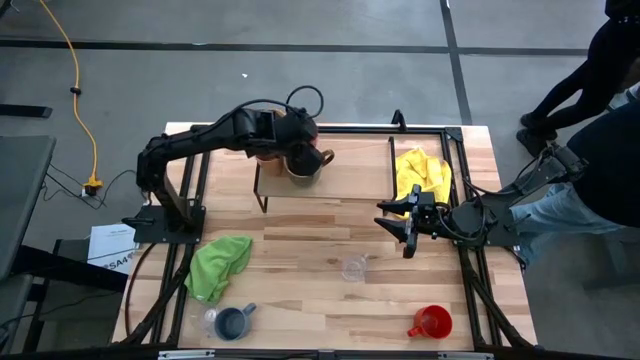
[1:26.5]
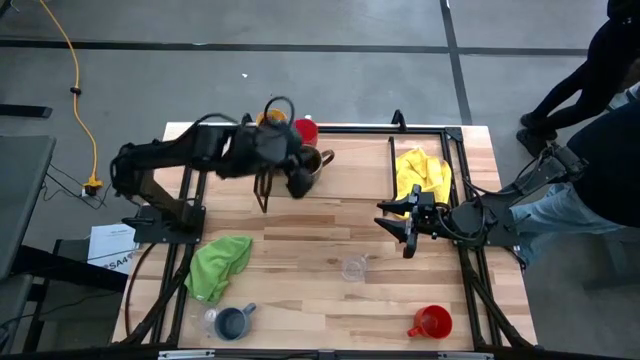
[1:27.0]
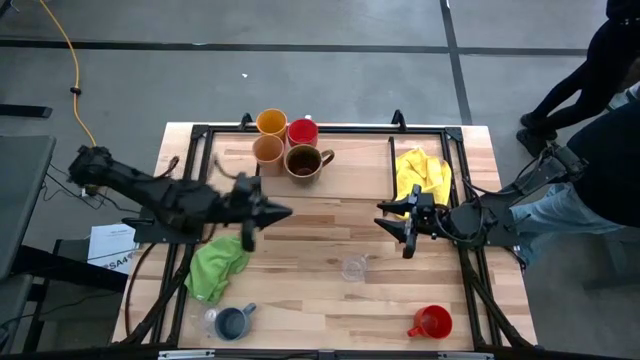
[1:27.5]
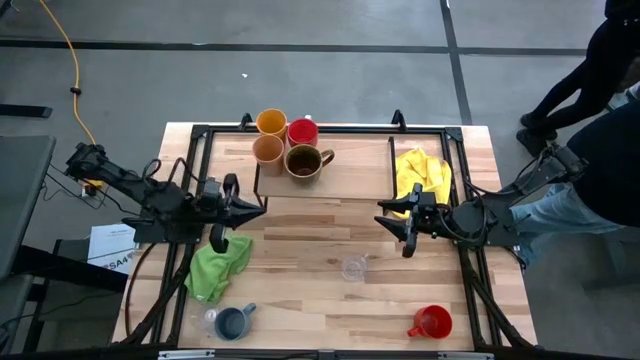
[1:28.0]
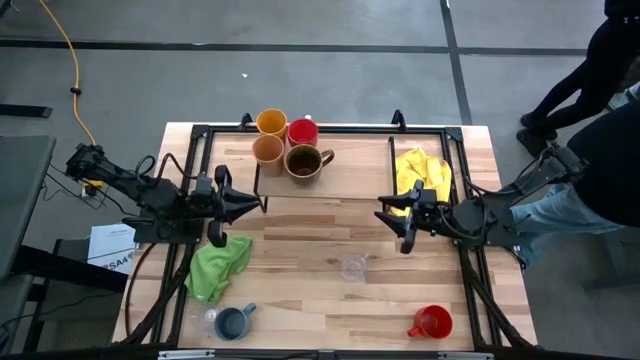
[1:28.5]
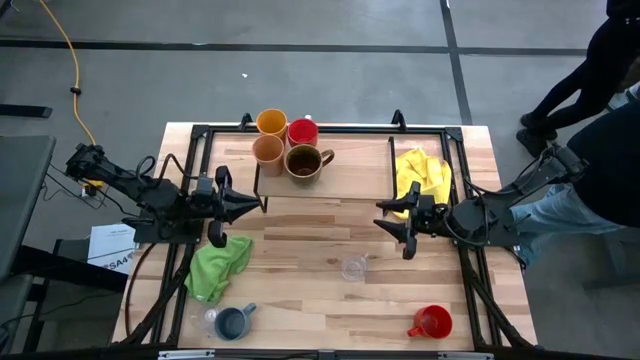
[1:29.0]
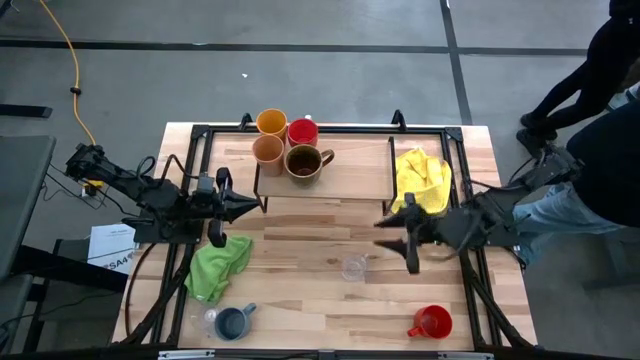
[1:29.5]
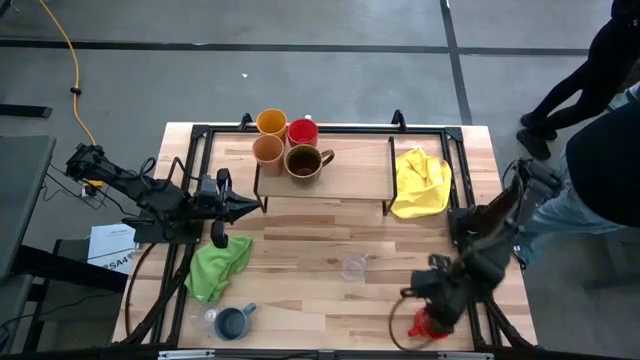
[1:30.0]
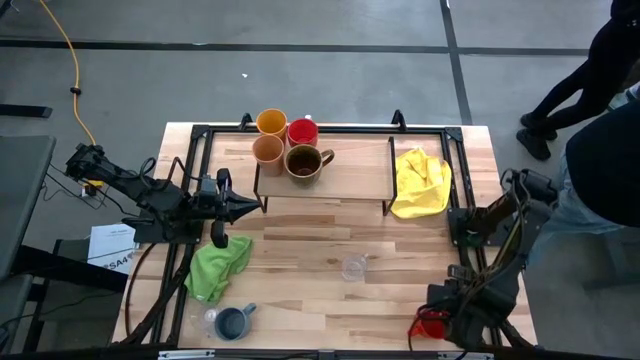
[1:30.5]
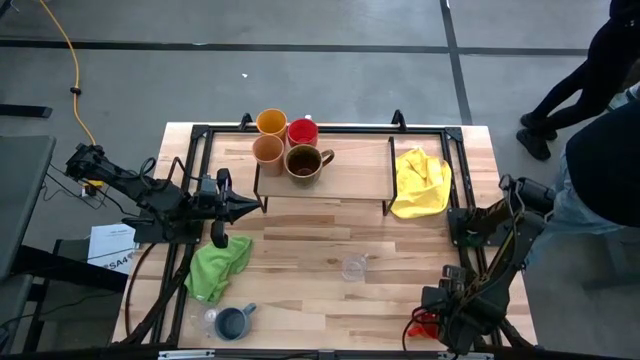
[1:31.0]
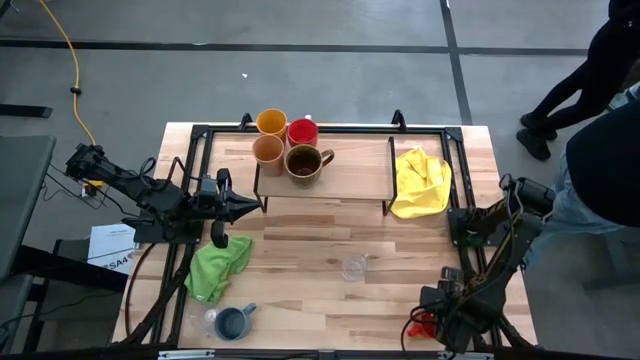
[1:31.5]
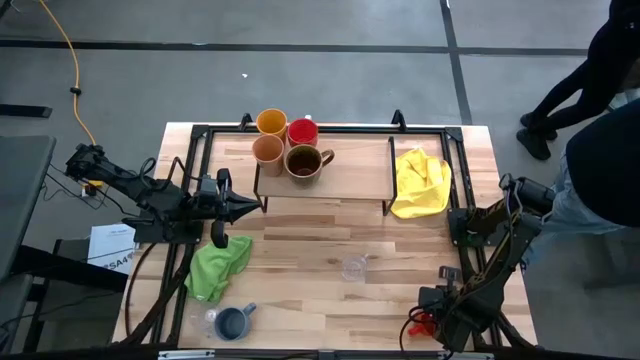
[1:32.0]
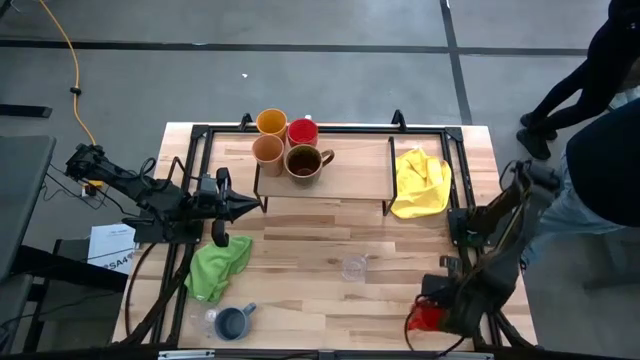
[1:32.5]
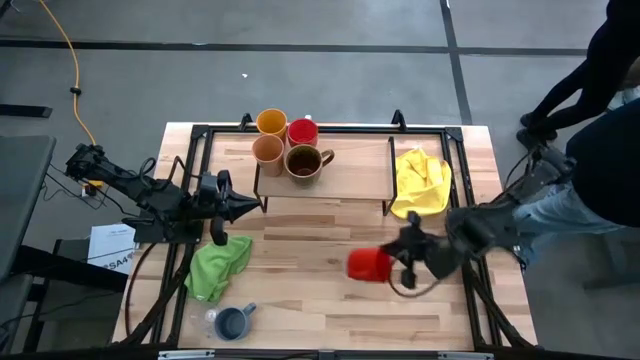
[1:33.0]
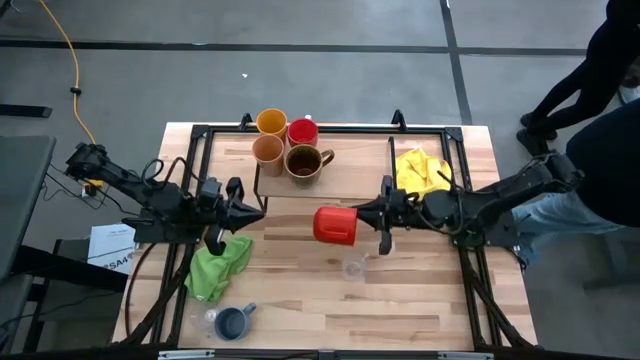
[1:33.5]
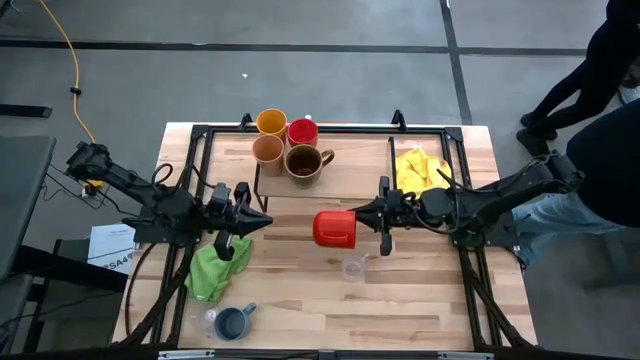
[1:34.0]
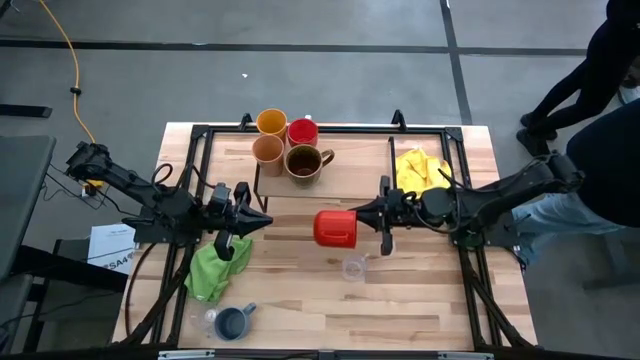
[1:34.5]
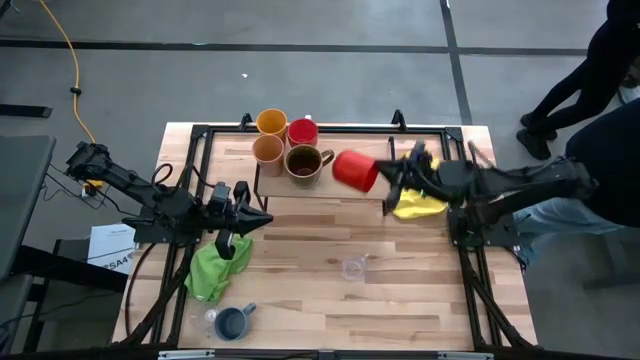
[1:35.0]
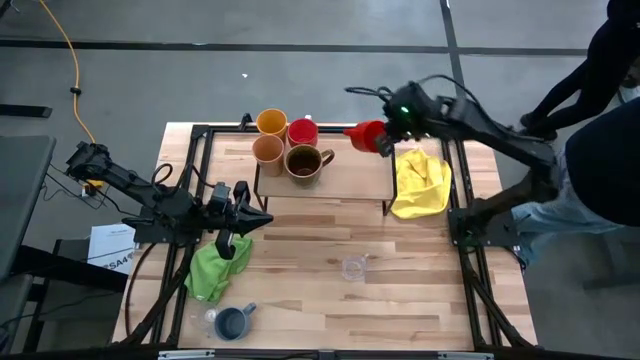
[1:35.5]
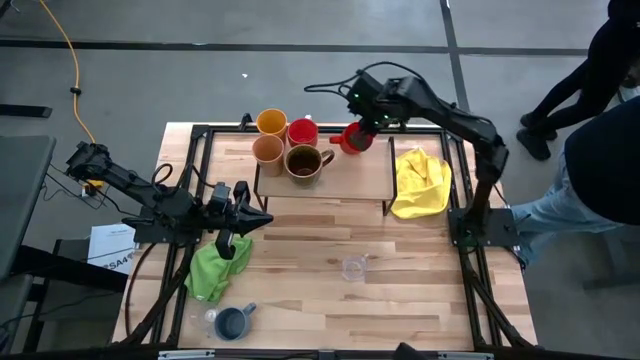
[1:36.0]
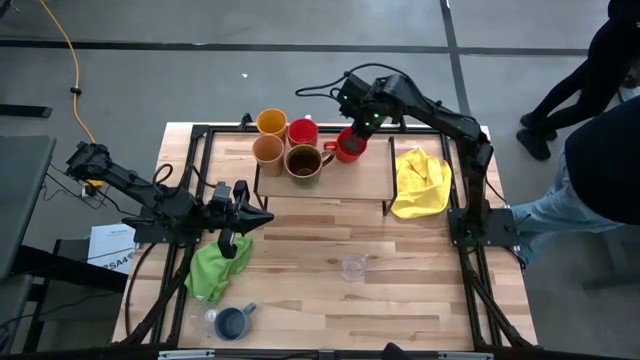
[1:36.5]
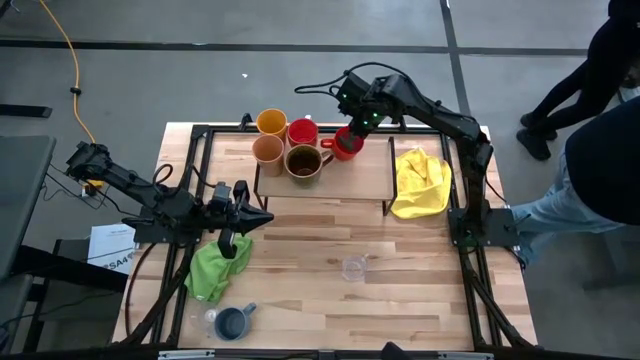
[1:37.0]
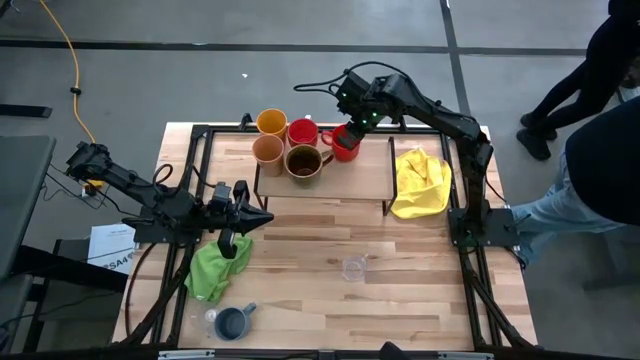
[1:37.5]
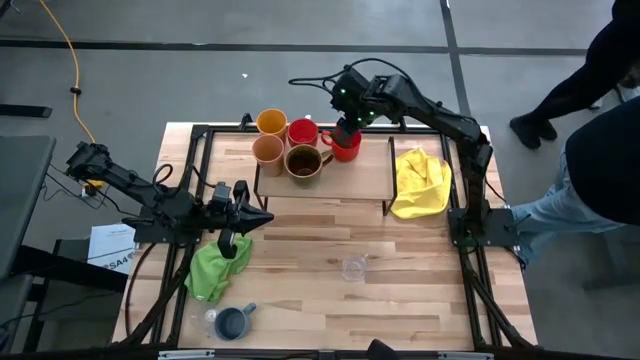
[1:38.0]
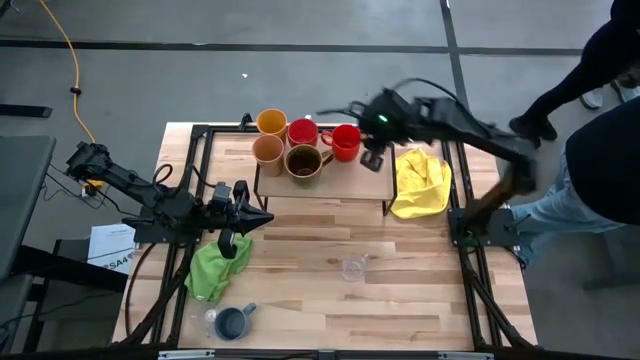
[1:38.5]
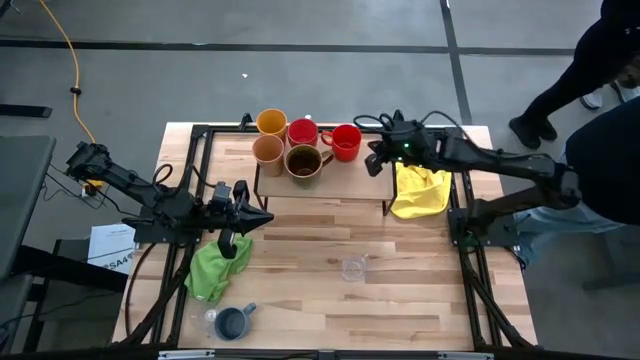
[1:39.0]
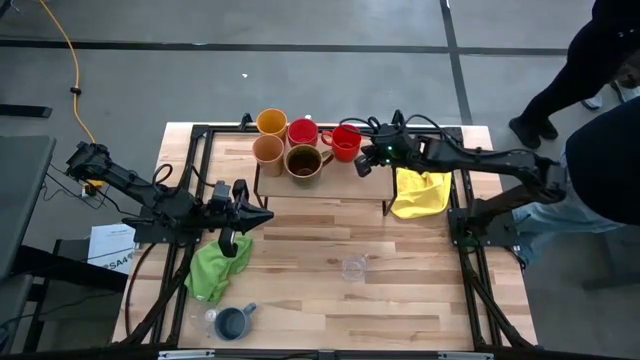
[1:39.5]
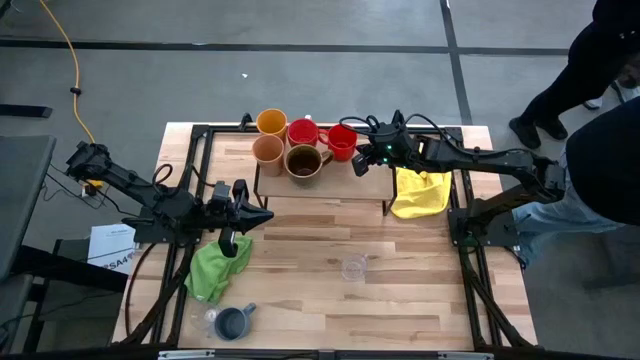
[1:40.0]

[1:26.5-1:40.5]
Task: Stack small to large cups/mugs on shelf
Put the red mug on the shelf

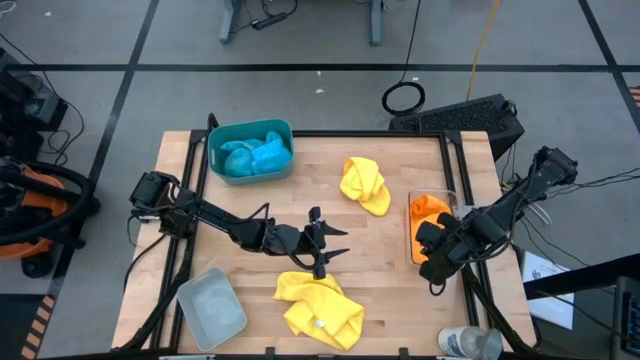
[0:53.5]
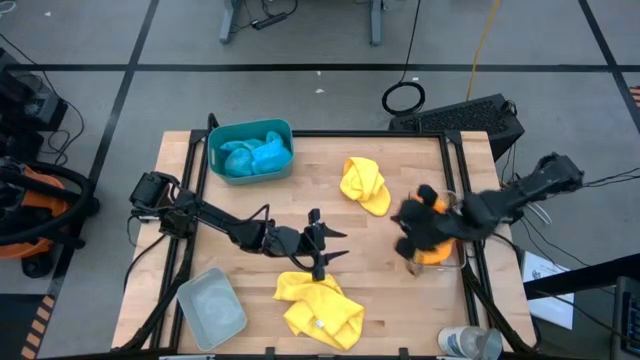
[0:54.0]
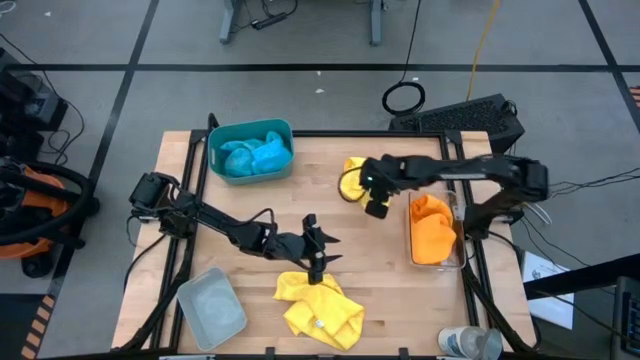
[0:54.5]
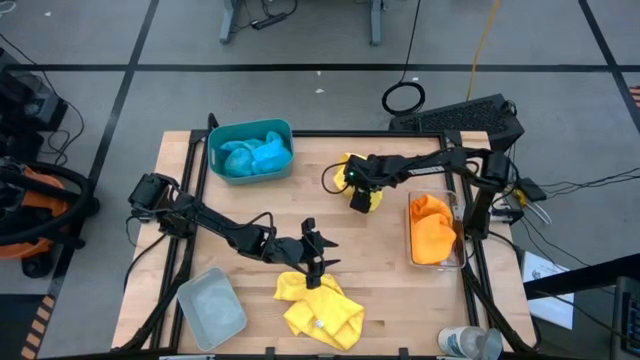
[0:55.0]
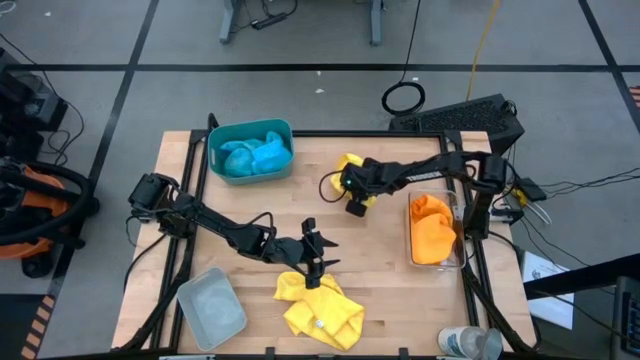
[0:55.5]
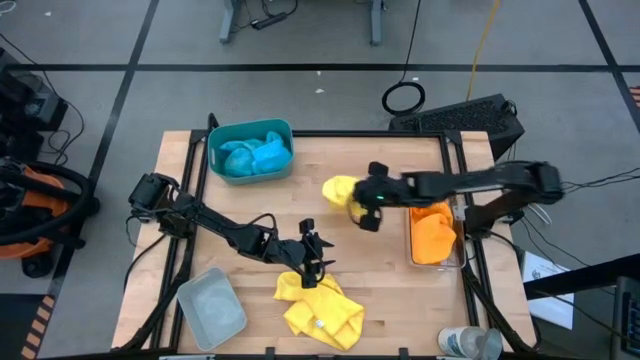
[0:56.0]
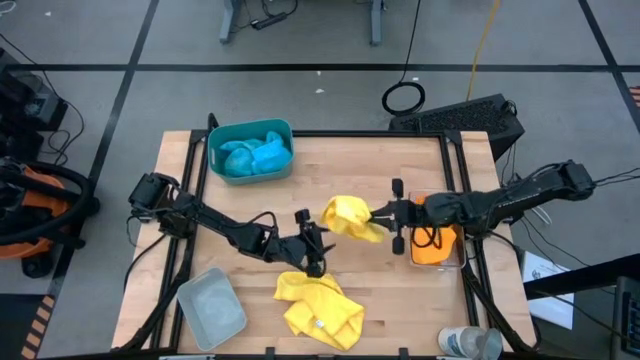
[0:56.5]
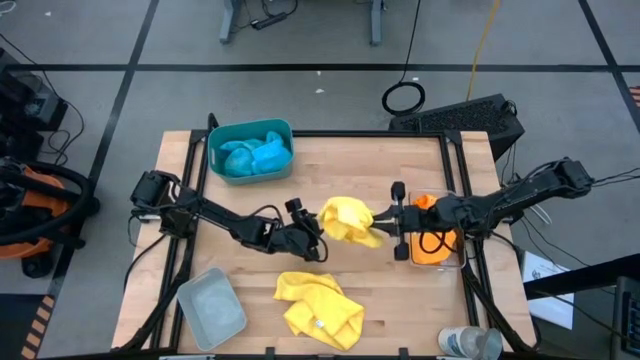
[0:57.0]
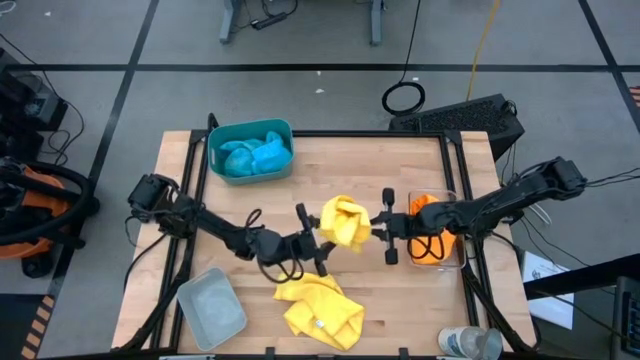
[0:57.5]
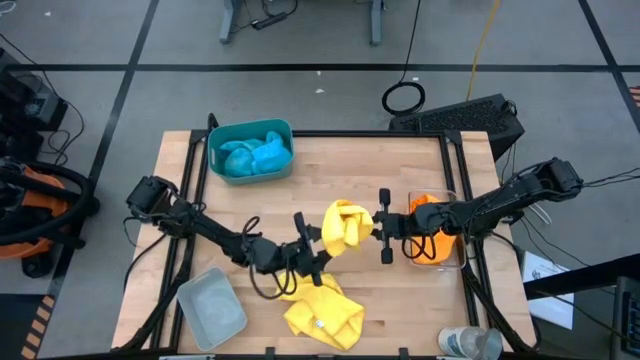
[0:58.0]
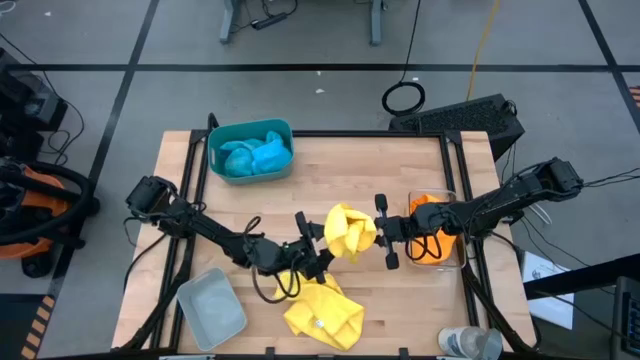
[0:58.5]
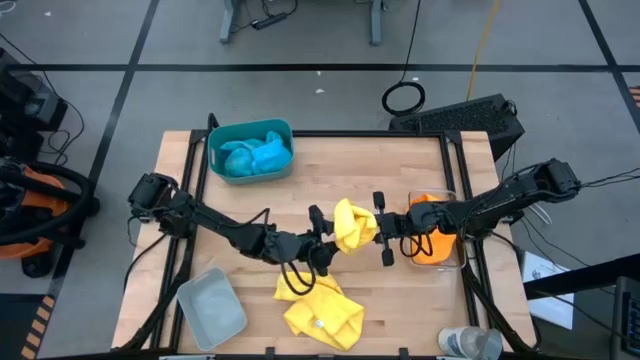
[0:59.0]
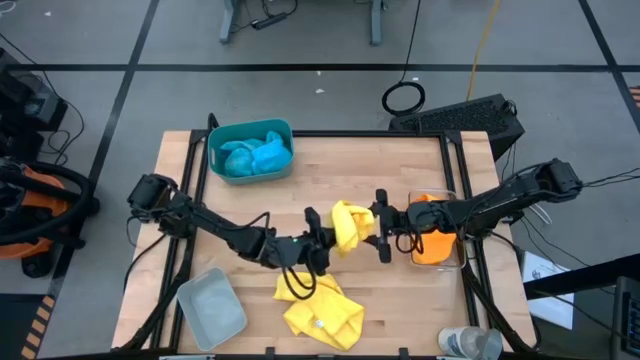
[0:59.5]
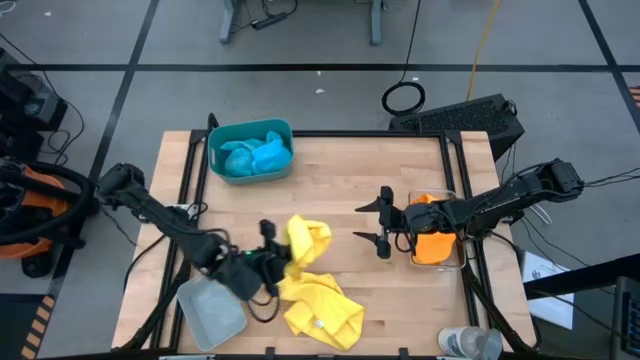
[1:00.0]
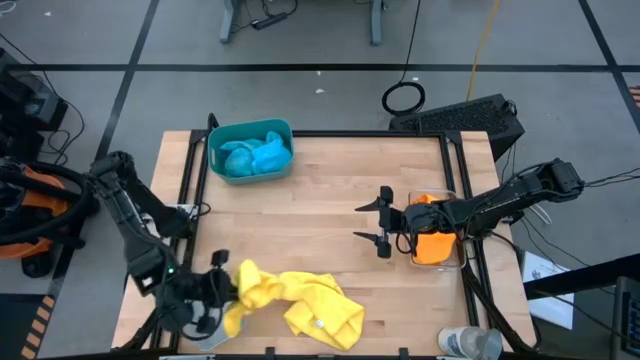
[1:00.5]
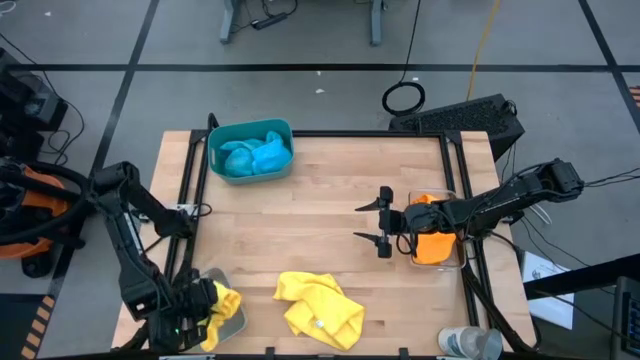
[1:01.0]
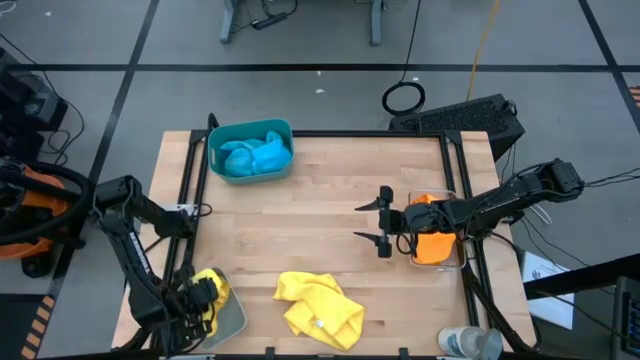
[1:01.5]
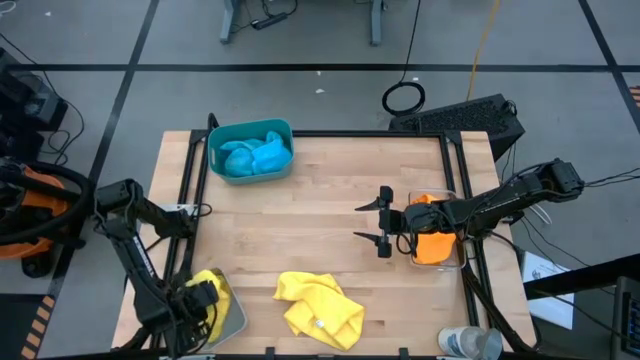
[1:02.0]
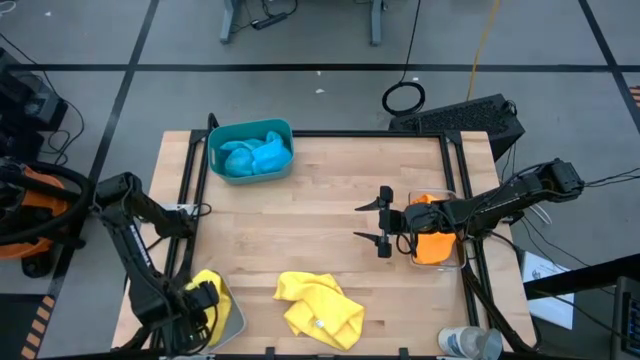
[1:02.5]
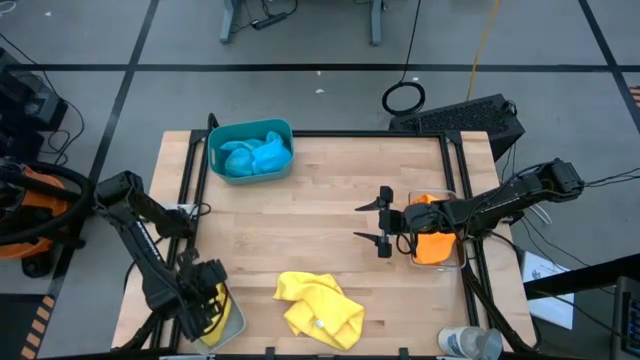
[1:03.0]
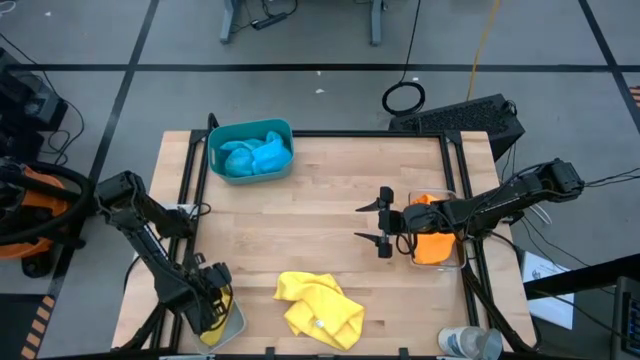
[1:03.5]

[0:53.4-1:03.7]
Task: Sort microfiber towel by color & place in baskets
Put the top yellow microfiber cloth into the gray bin
